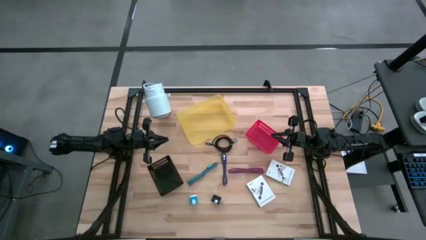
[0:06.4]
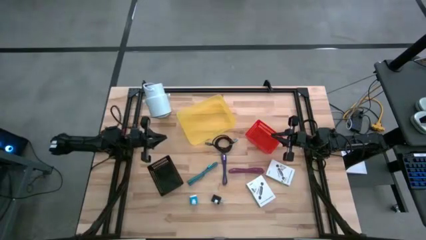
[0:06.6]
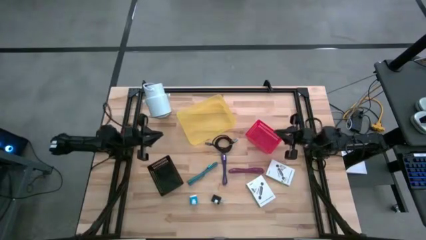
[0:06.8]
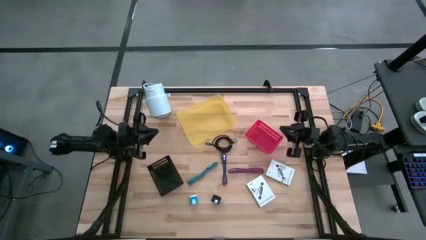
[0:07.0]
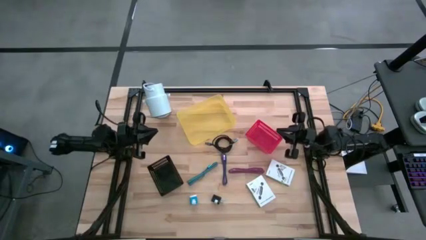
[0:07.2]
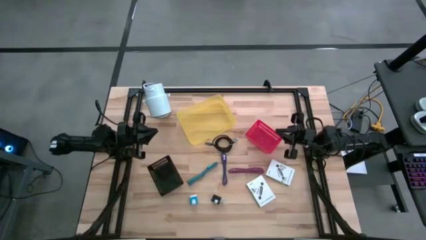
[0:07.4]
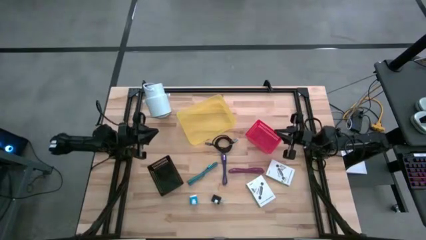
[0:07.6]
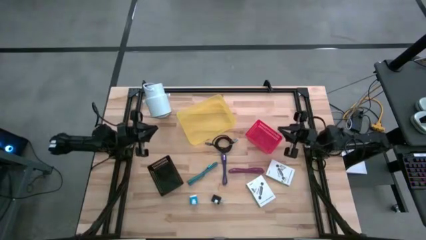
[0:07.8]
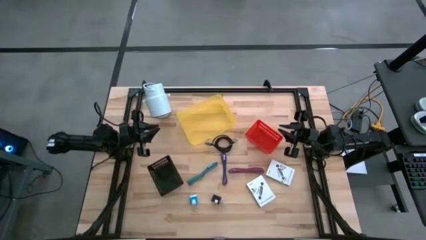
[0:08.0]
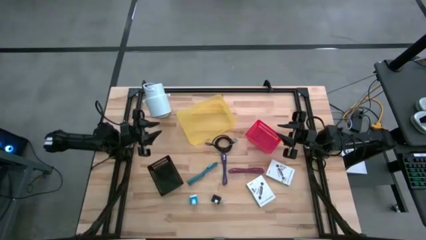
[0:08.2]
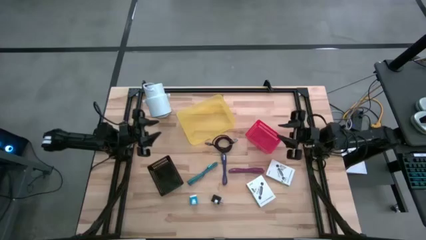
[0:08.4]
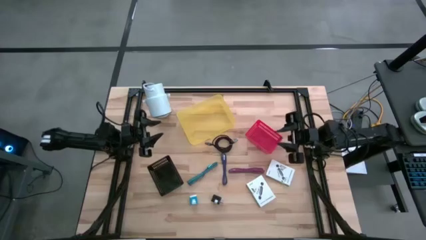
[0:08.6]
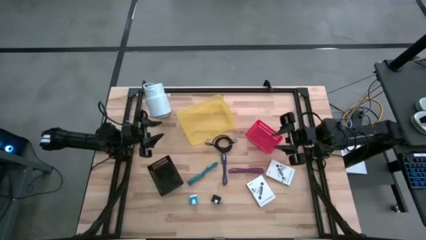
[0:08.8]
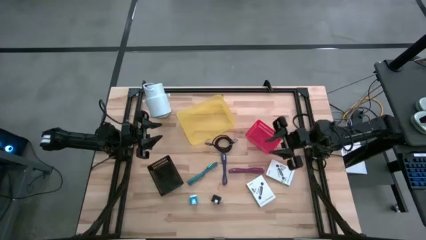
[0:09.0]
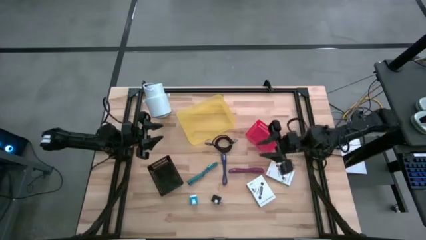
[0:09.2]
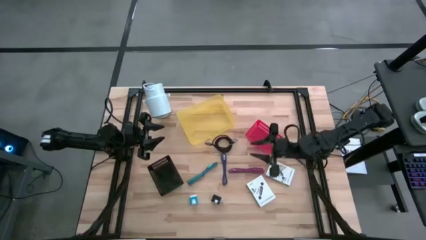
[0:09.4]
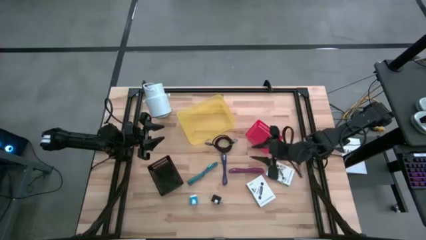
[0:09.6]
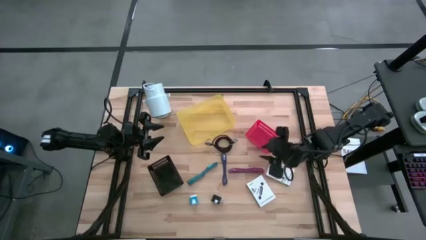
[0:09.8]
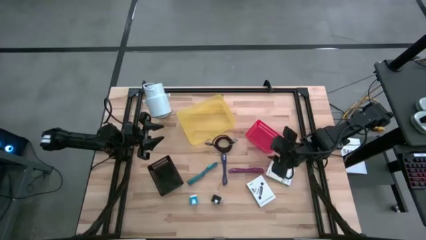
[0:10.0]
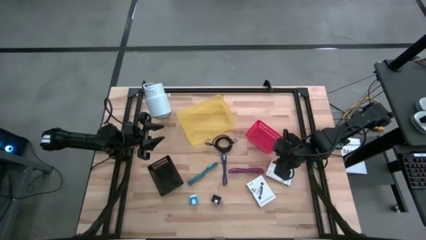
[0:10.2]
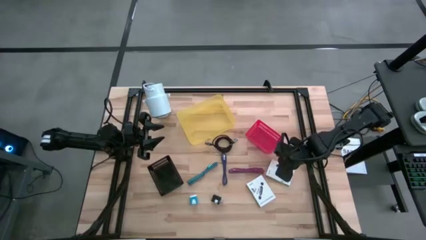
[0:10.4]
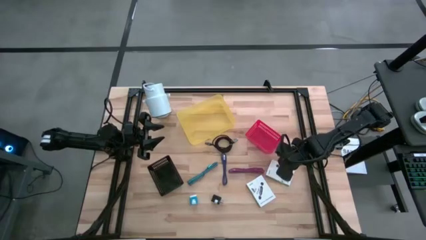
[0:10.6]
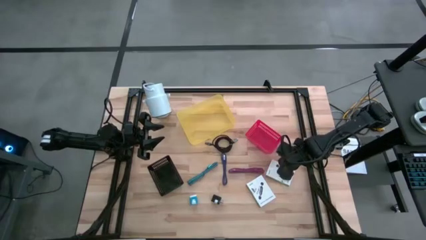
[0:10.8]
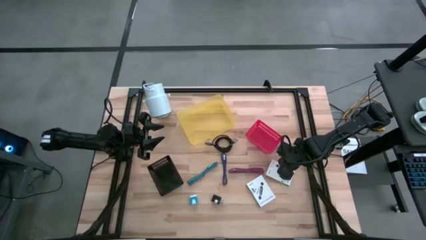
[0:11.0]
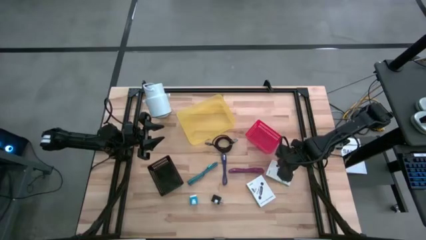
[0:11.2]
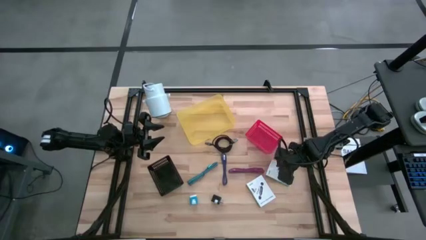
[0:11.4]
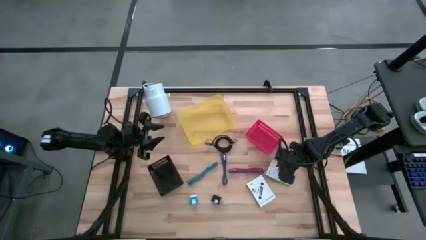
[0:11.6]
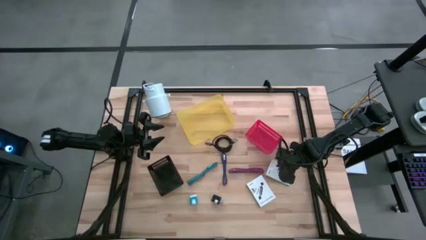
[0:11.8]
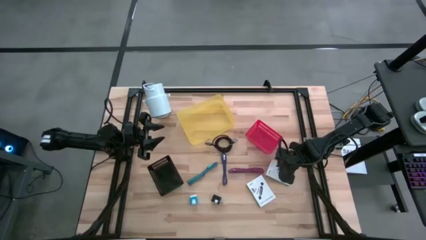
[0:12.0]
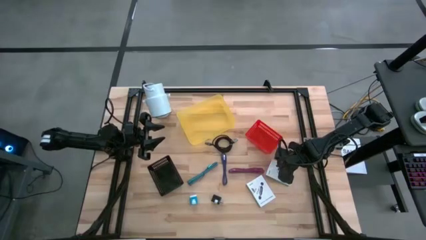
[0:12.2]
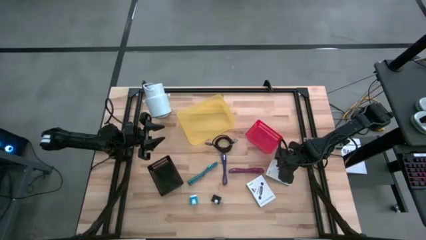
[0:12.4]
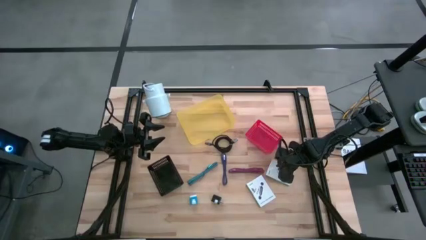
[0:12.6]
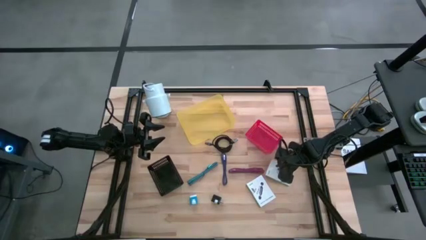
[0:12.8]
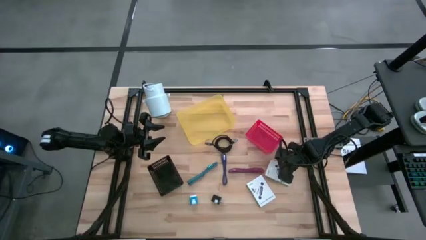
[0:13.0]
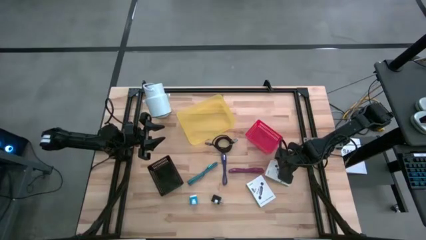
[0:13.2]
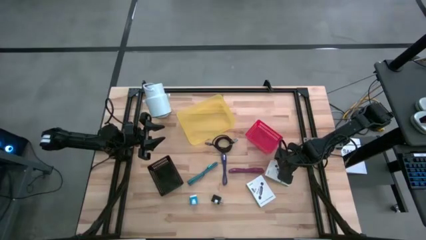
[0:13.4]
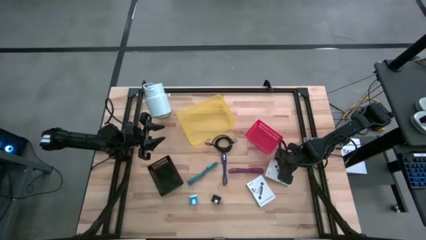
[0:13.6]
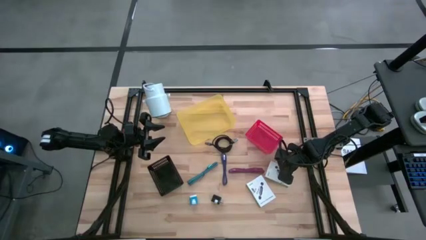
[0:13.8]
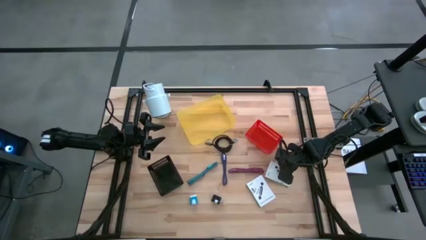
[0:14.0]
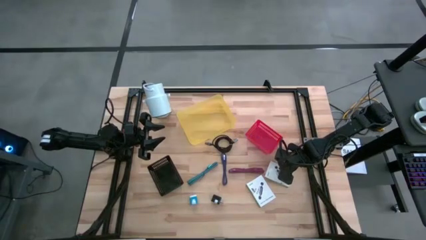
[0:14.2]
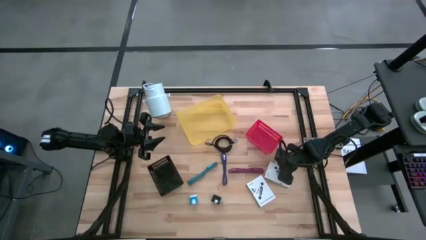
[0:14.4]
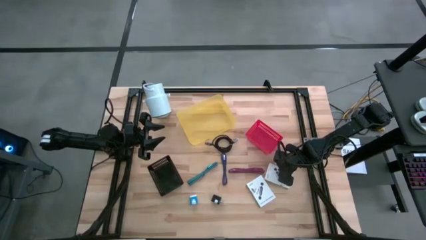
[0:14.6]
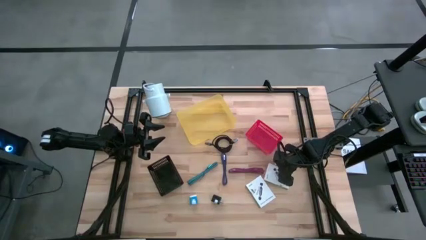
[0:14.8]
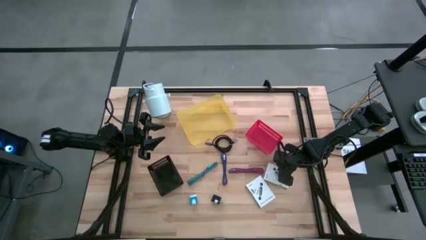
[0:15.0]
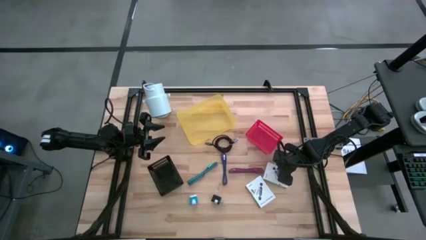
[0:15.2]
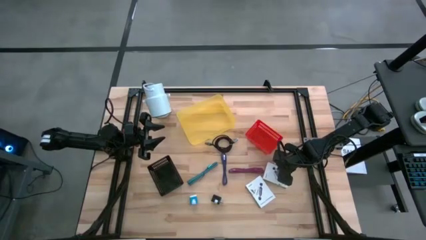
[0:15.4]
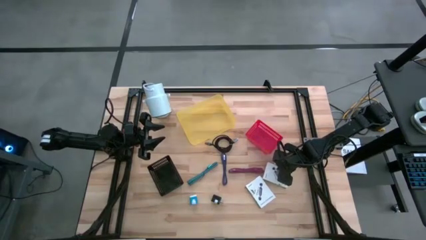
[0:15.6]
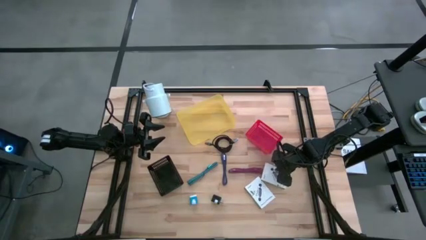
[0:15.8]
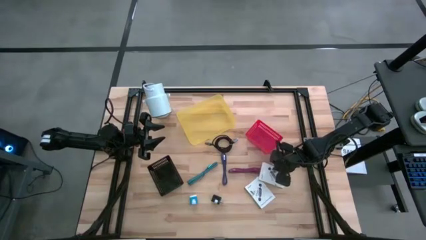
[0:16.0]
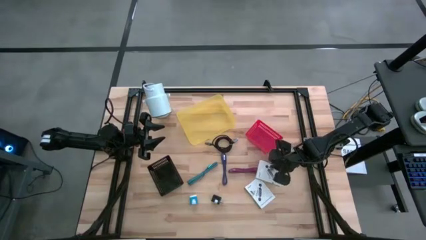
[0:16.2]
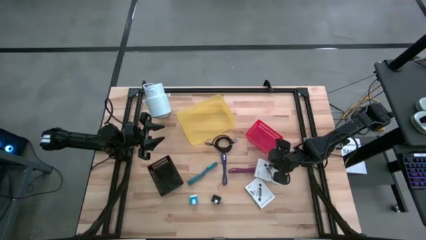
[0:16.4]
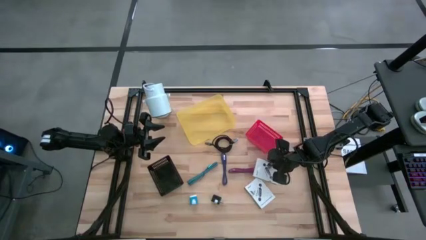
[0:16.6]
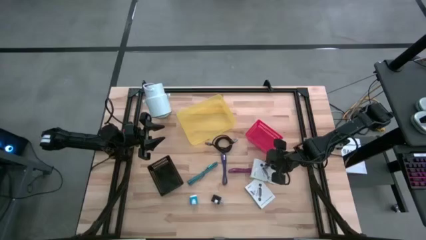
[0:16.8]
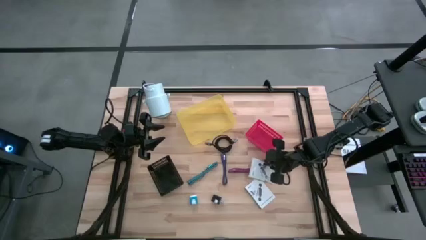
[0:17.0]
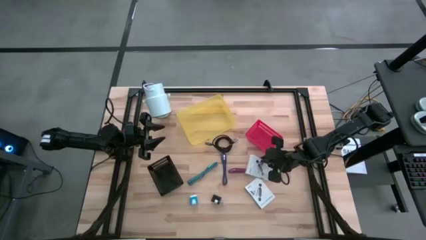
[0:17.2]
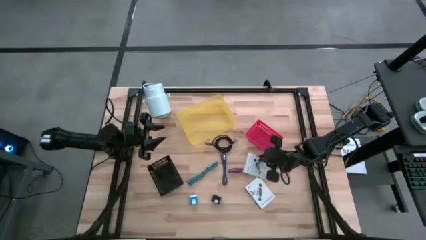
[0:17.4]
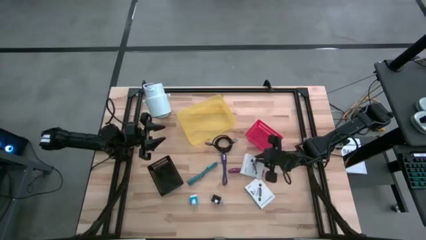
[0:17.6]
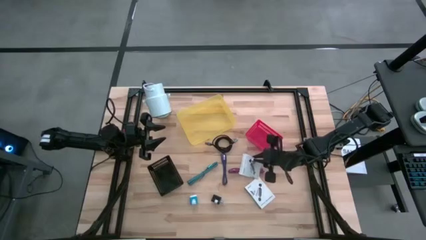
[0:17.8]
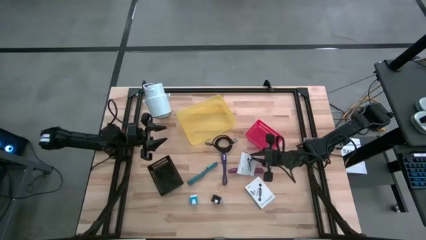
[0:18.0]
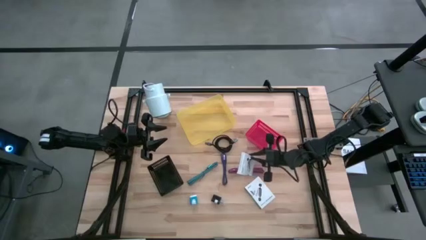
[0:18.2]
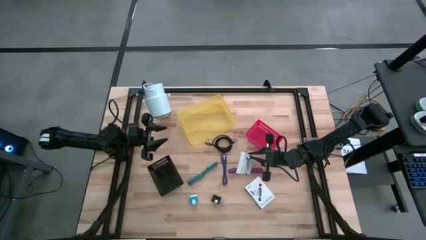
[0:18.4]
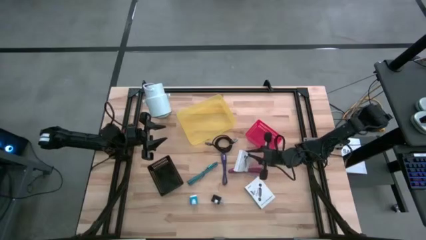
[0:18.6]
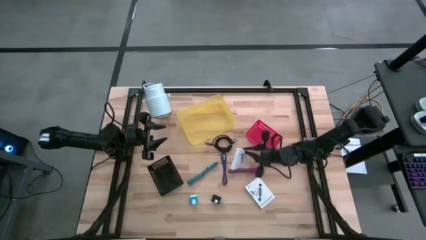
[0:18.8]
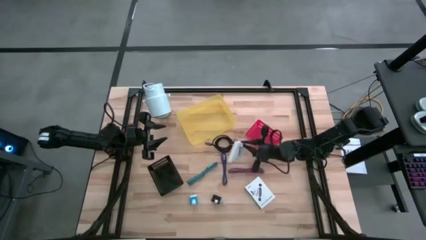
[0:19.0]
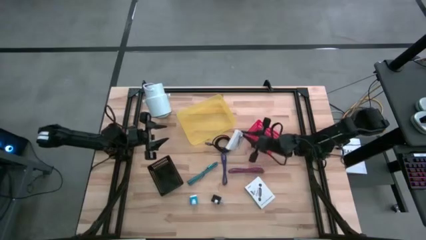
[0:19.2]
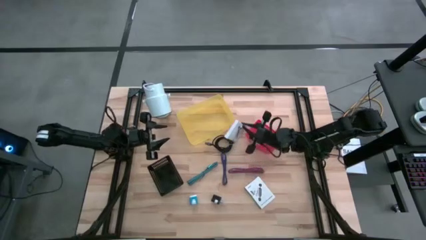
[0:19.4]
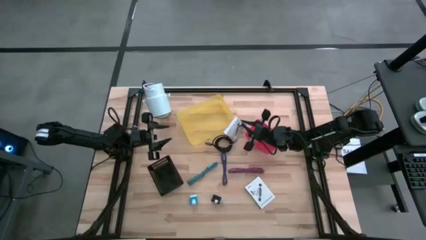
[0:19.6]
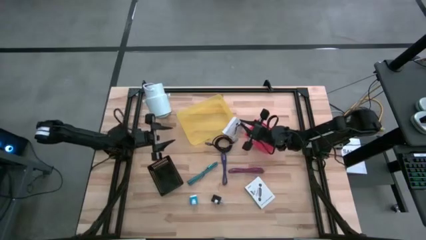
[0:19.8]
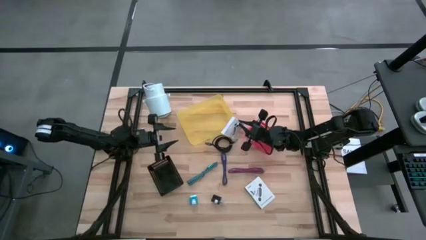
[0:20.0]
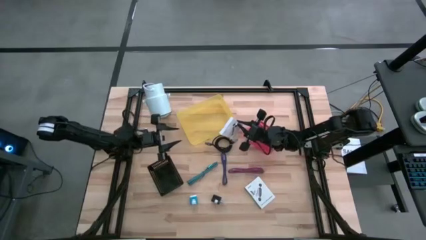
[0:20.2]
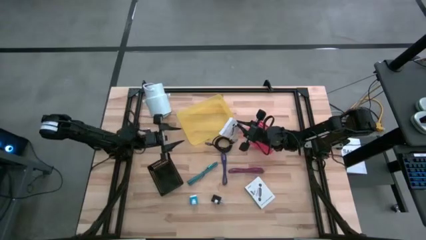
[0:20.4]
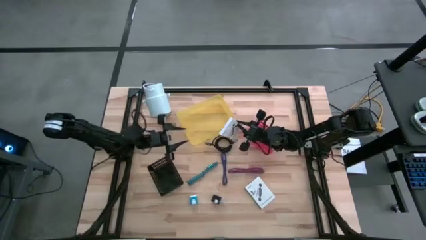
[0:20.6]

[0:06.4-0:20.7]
Task: Pick and place items into bin
Put the top card reader box into the black bin
